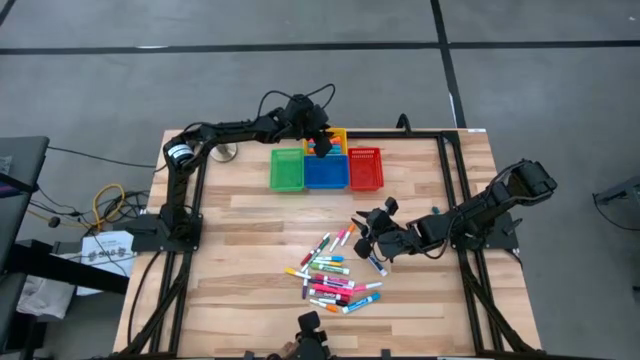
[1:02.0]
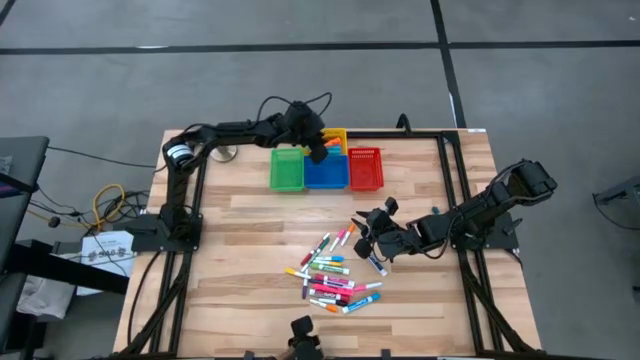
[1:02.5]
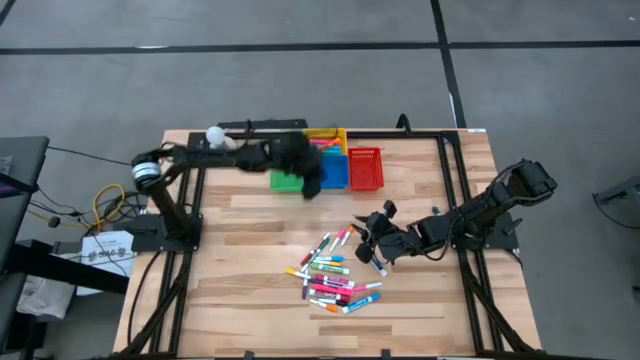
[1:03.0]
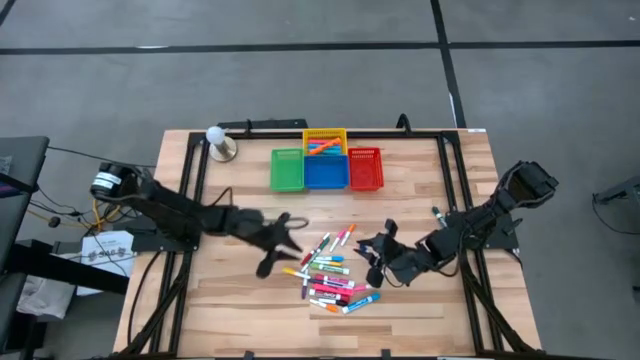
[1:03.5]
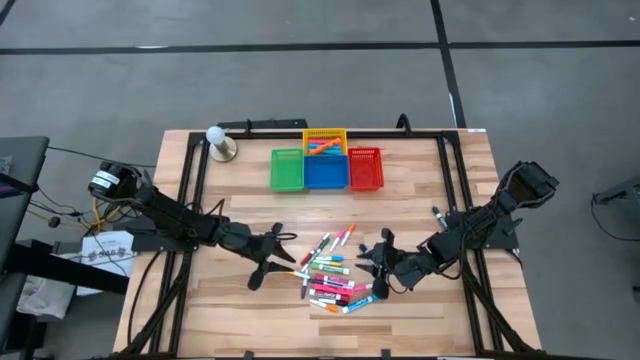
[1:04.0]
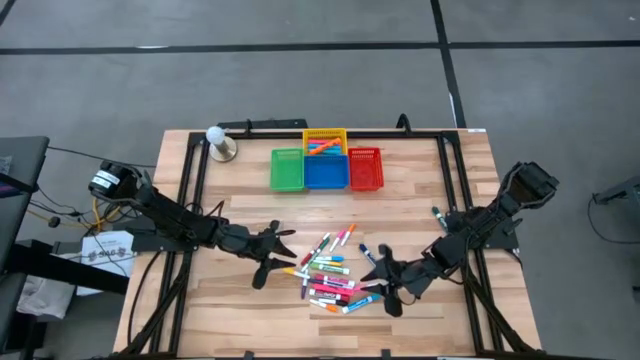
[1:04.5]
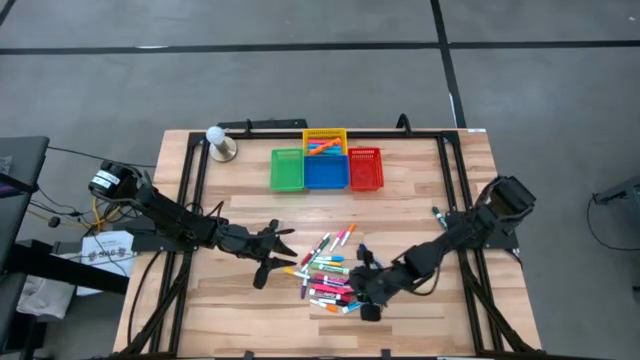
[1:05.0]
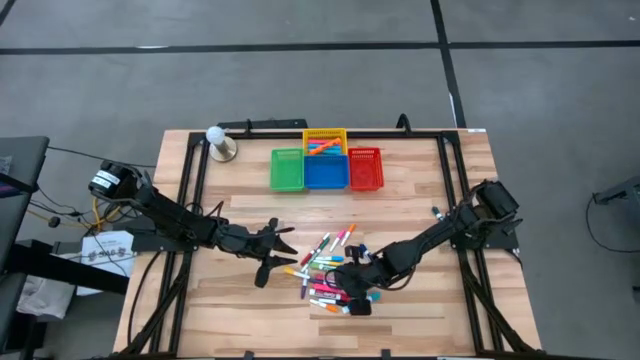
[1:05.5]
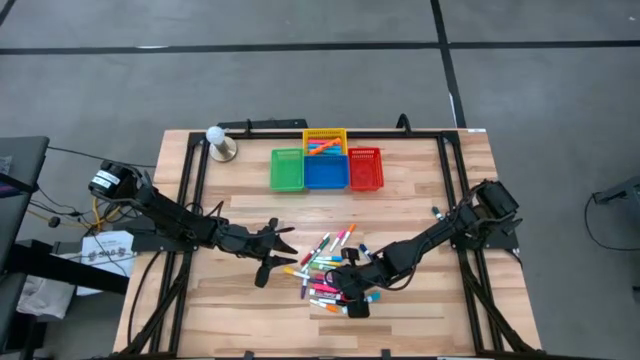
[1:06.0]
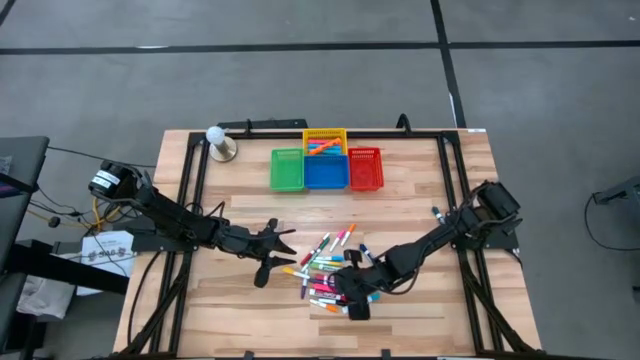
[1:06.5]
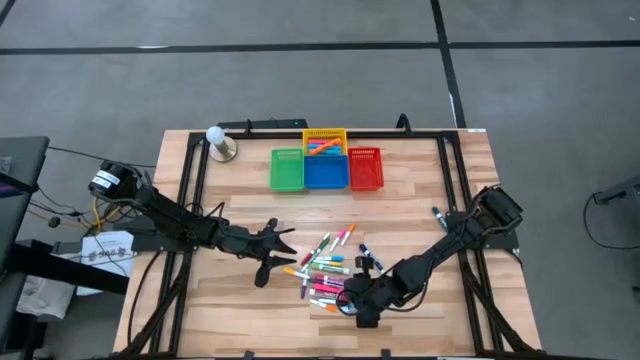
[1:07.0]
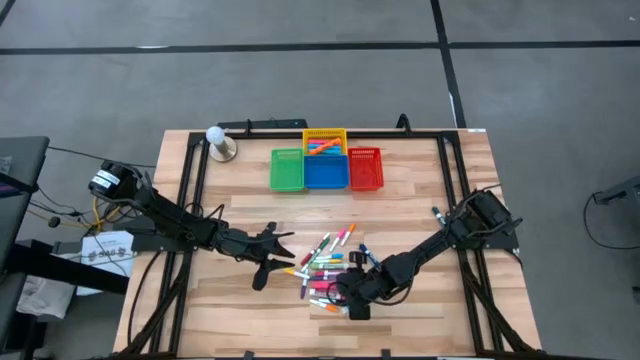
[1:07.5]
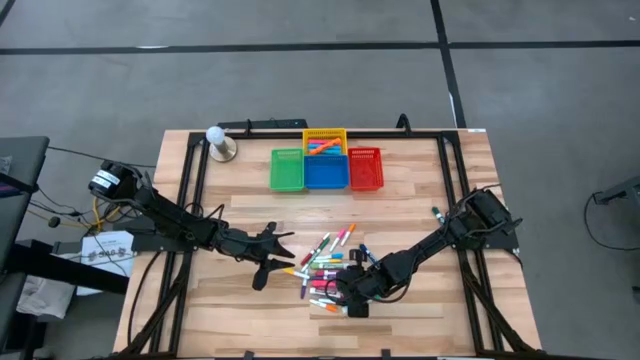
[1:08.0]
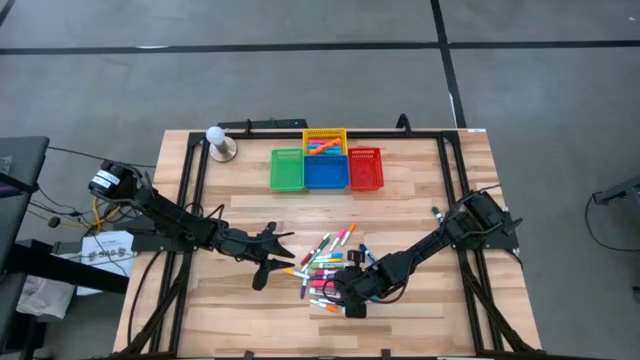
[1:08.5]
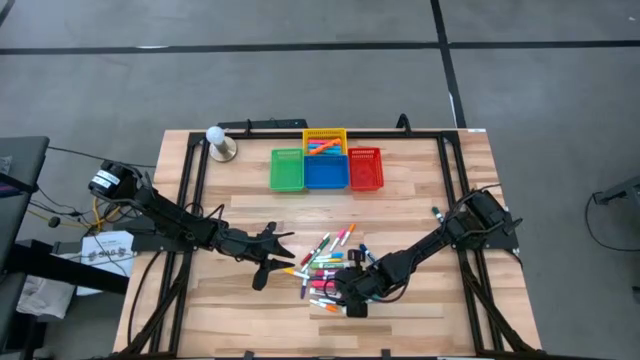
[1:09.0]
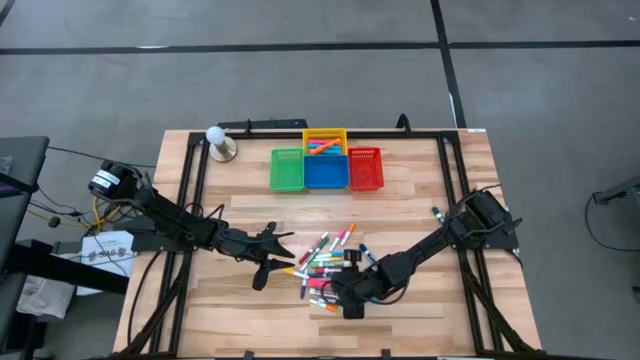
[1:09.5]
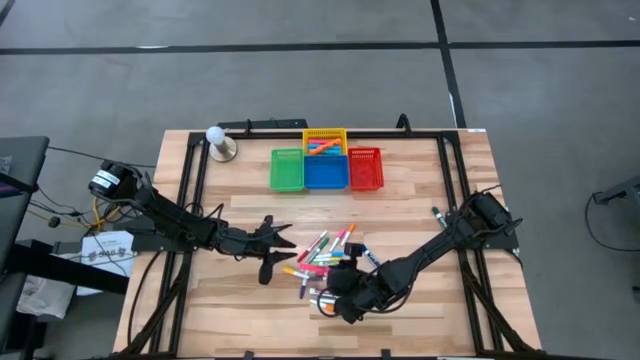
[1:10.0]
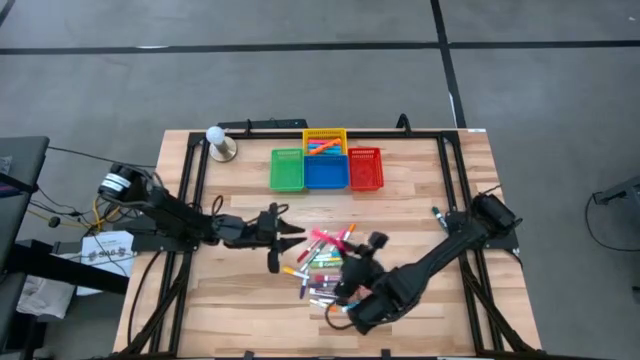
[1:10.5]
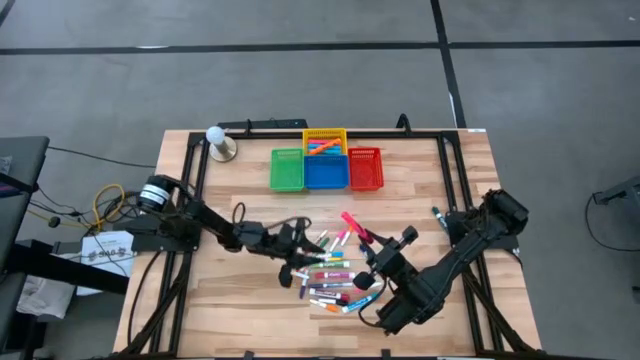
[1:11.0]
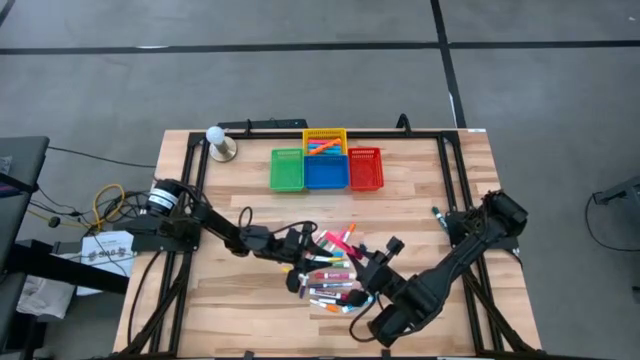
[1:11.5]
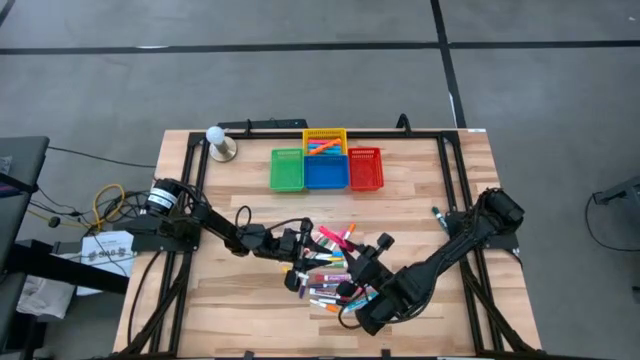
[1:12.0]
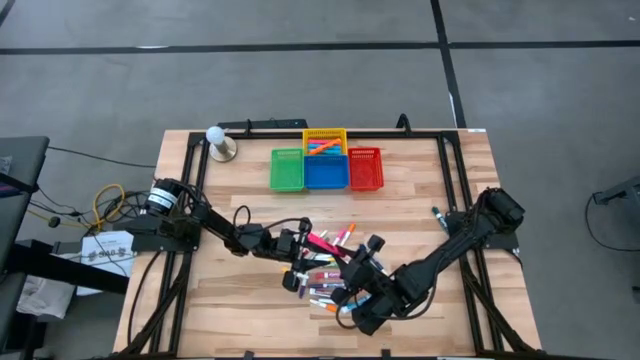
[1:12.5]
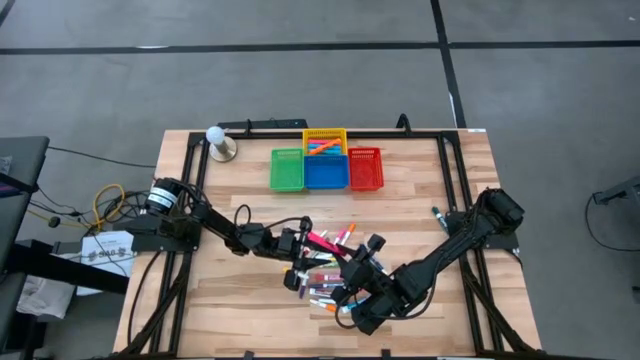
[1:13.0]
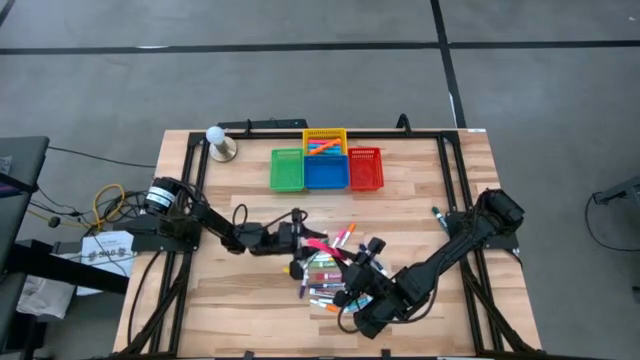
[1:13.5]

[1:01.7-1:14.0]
Task: Pick & Place Markers
Put the large pink highlighter pen into the yellow bin

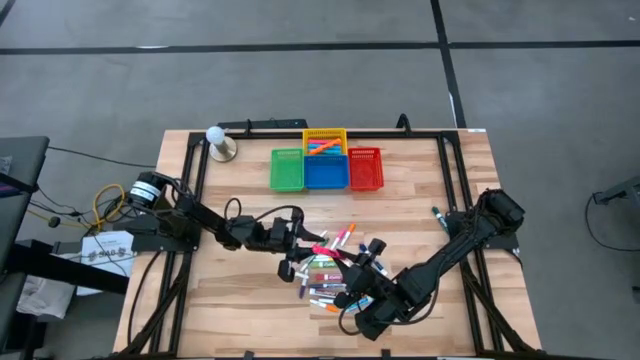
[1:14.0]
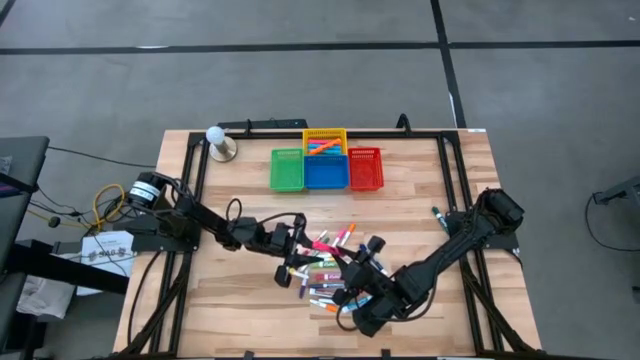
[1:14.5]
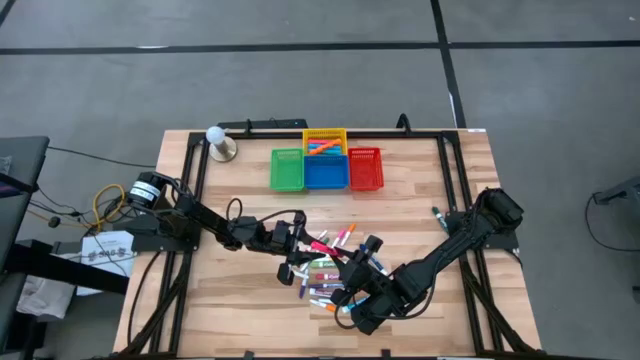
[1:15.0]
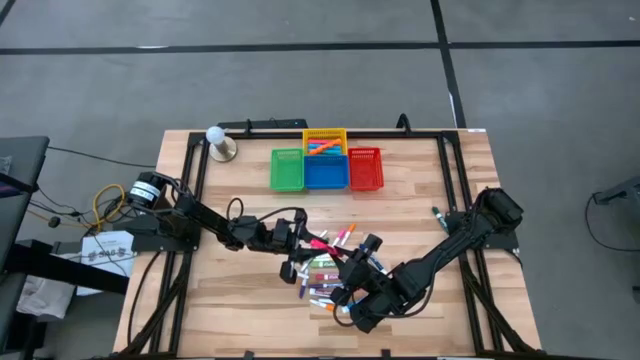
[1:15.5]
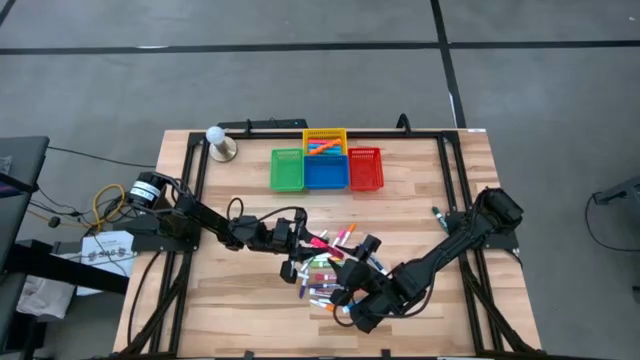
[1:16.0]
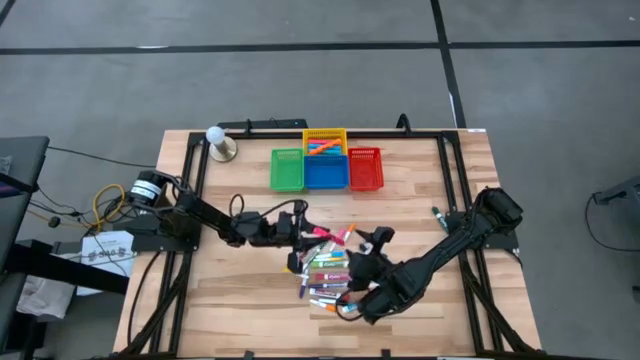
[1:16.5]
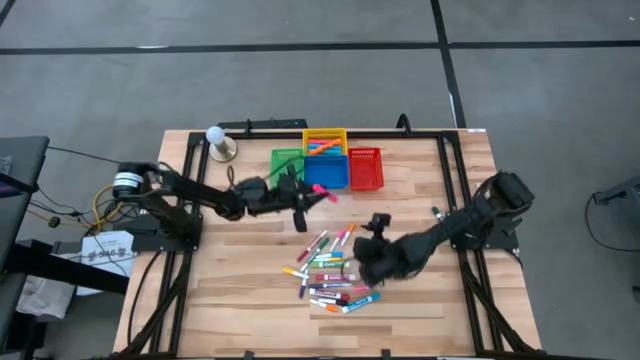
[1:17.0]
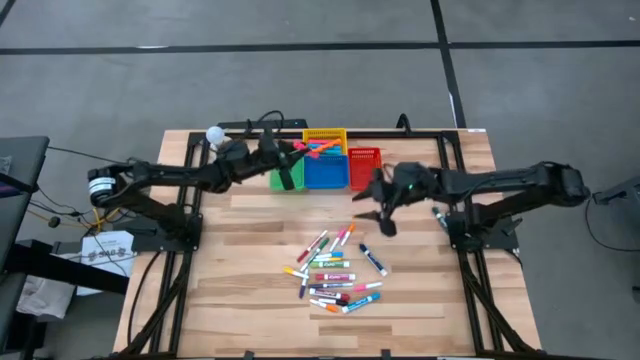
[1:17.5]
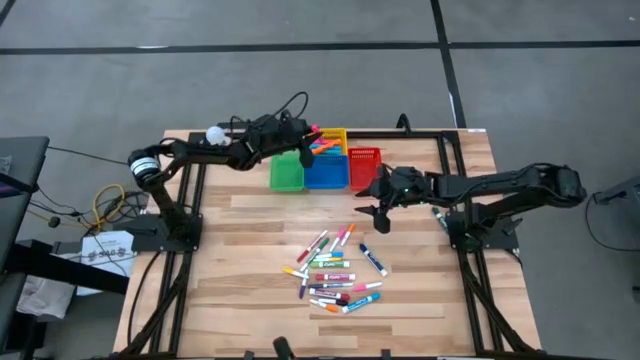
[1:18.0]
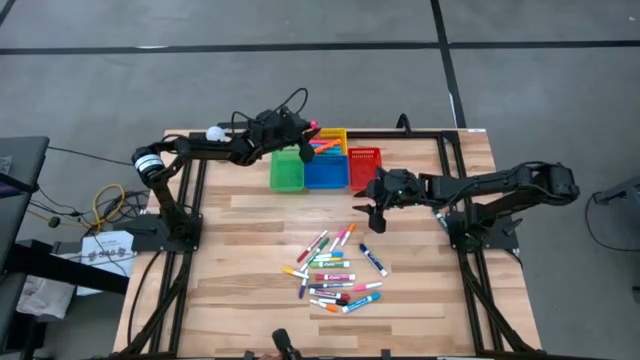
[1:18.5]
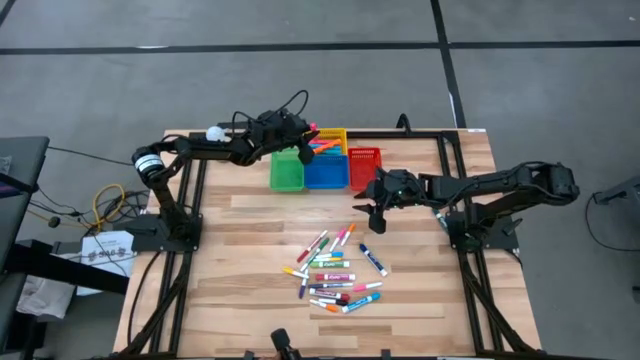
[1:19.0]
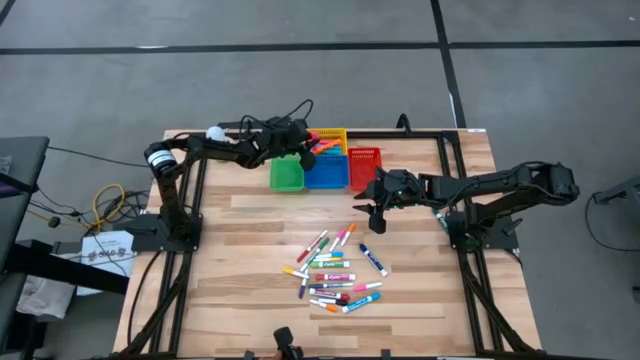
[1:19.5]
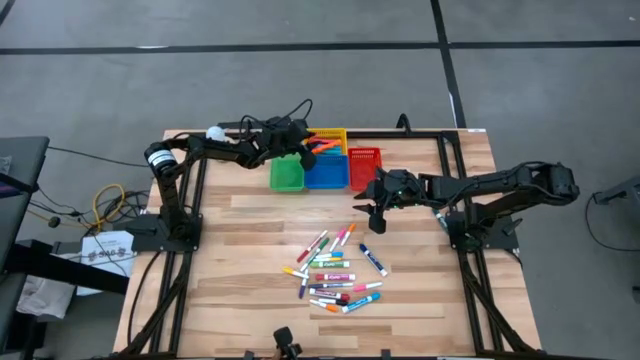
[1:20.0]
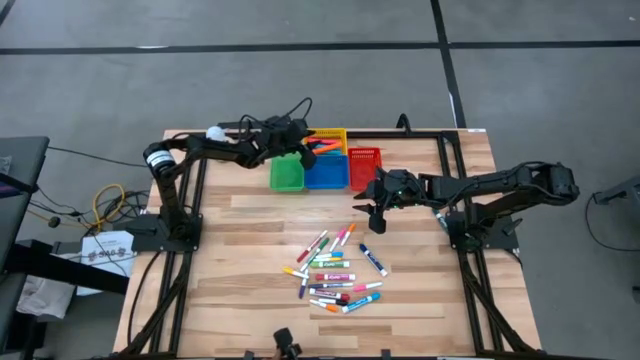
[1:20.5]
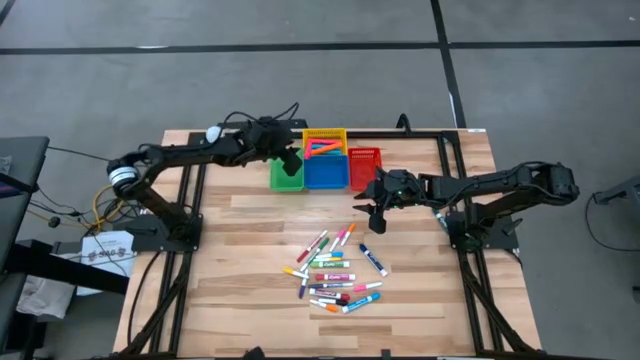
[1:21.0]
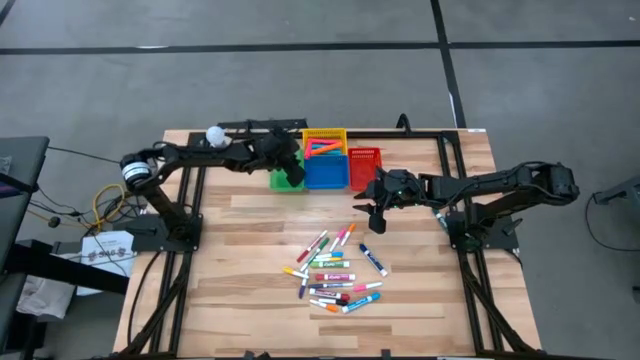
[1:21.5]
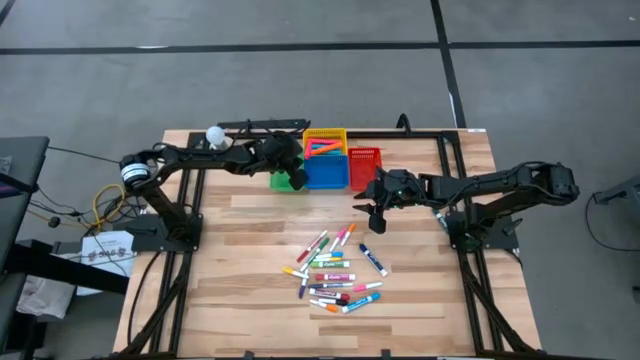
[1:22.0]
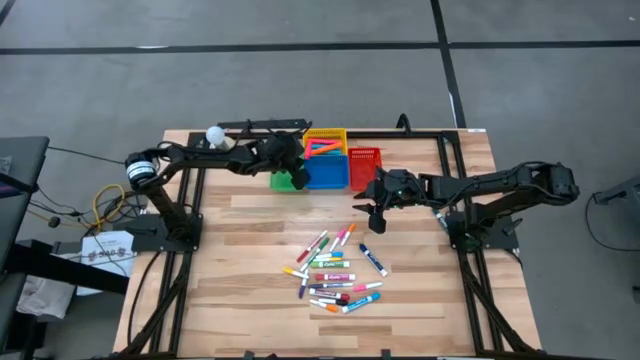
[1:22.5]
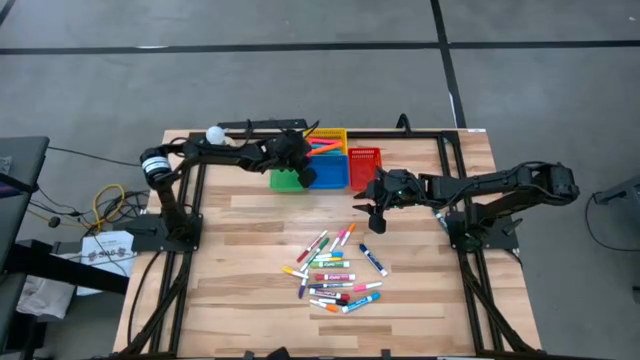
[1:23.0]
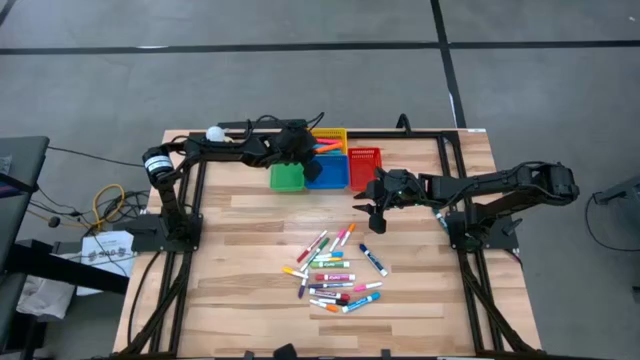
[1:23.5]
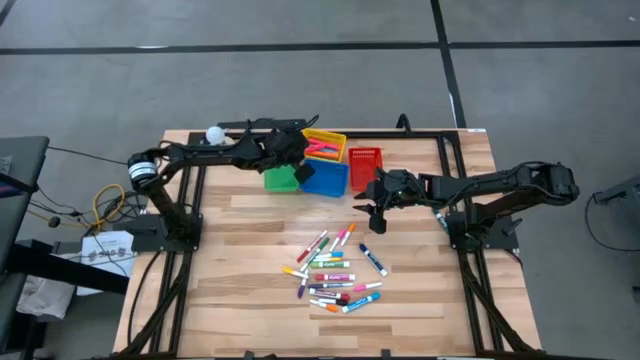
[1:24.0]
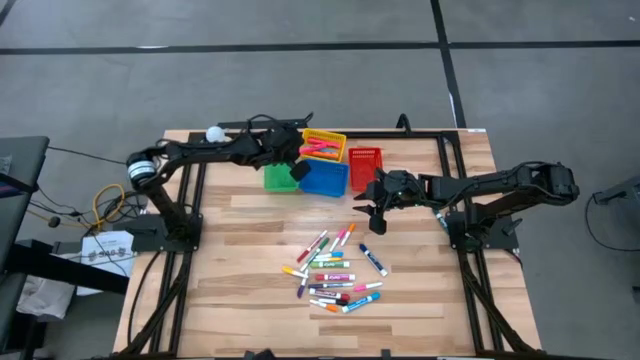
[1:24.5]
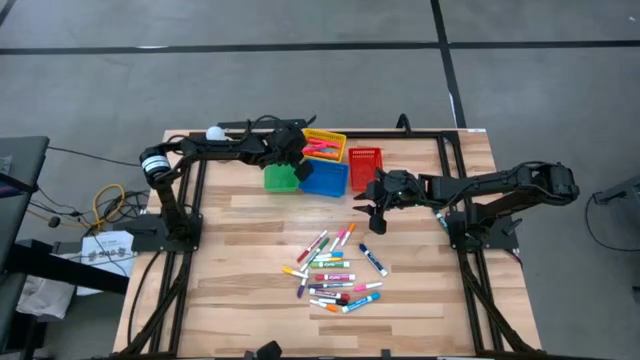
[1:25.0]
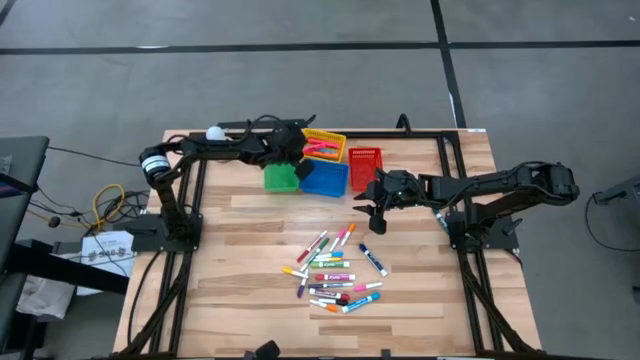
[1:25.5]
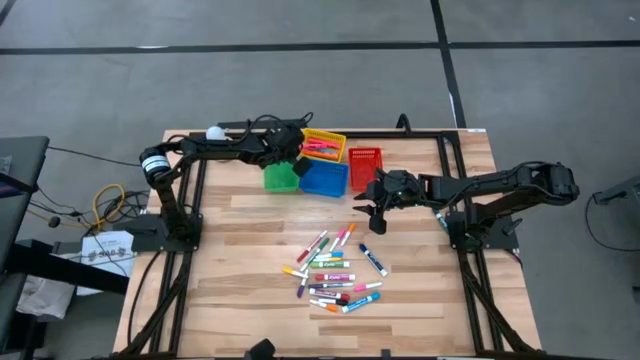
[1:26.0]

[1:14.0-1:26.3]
Put the large pink highlighter pen into the yellow bin
